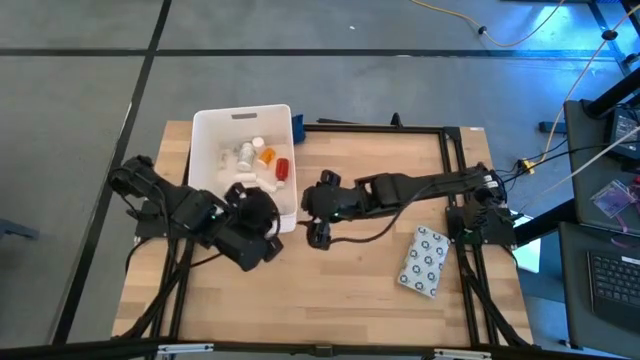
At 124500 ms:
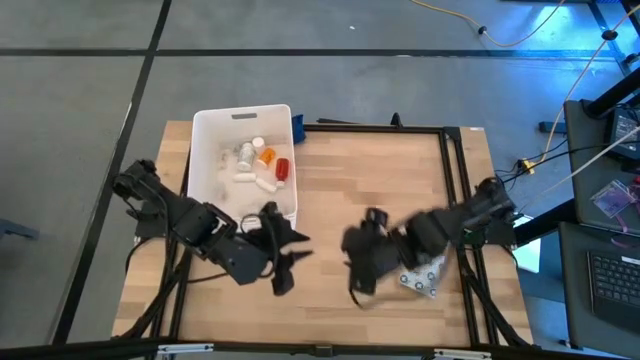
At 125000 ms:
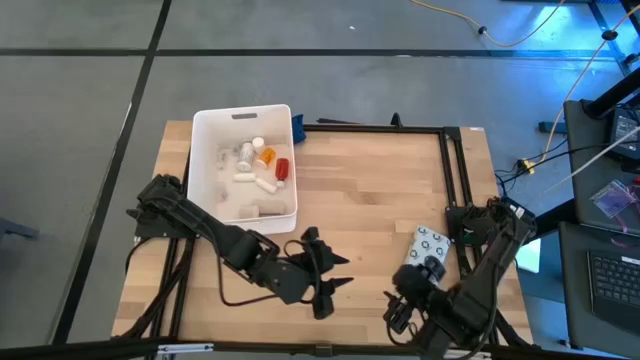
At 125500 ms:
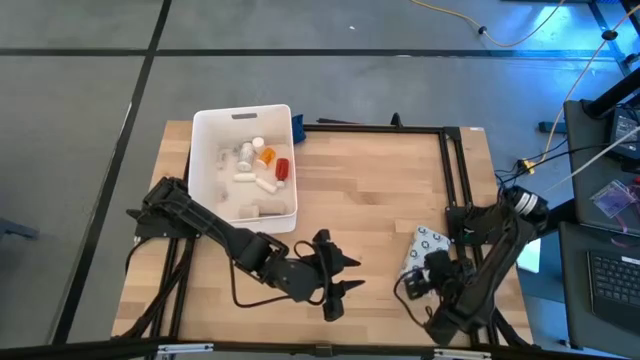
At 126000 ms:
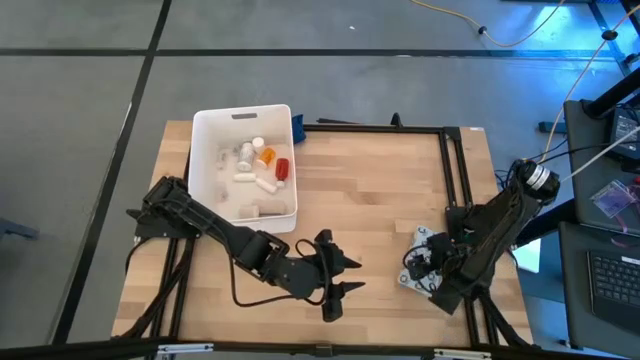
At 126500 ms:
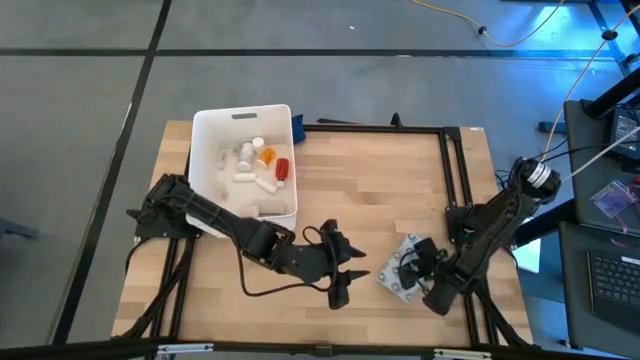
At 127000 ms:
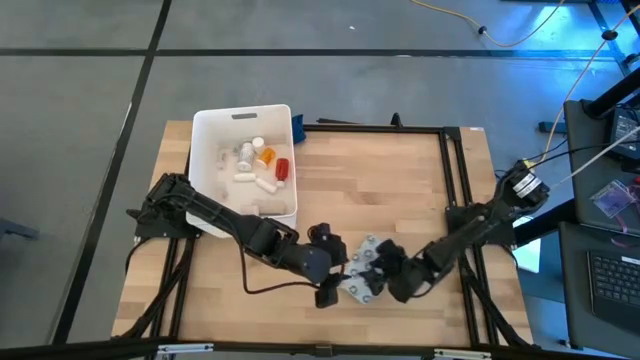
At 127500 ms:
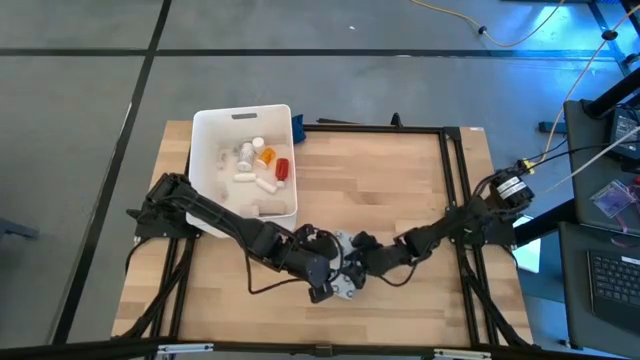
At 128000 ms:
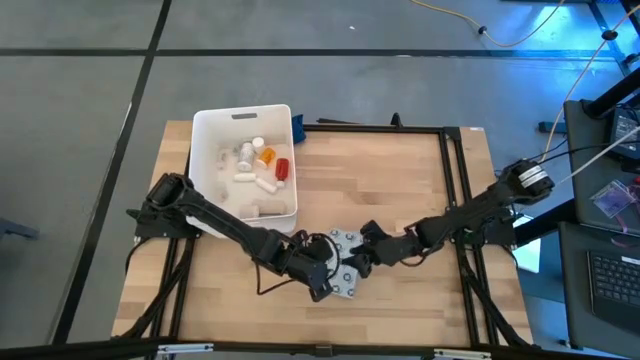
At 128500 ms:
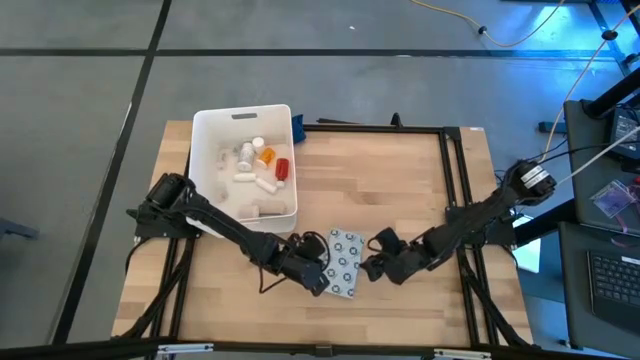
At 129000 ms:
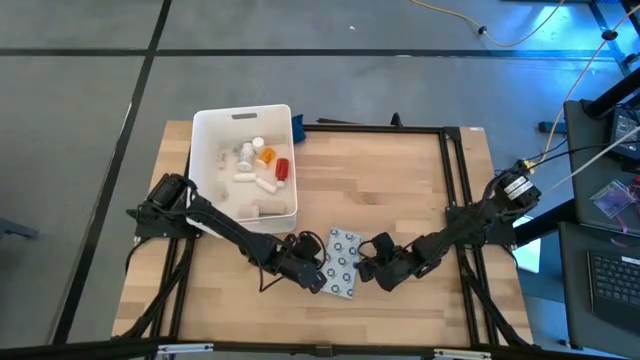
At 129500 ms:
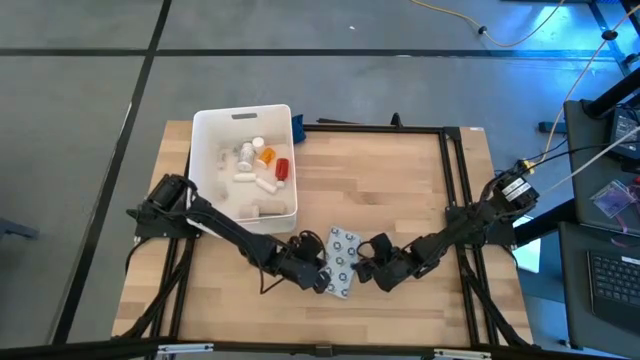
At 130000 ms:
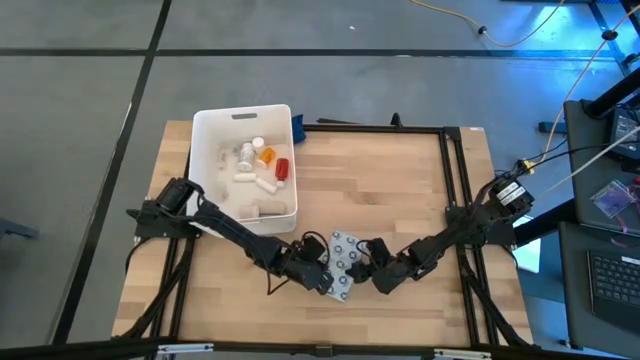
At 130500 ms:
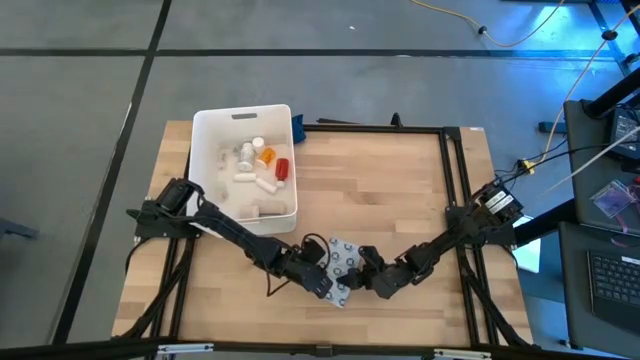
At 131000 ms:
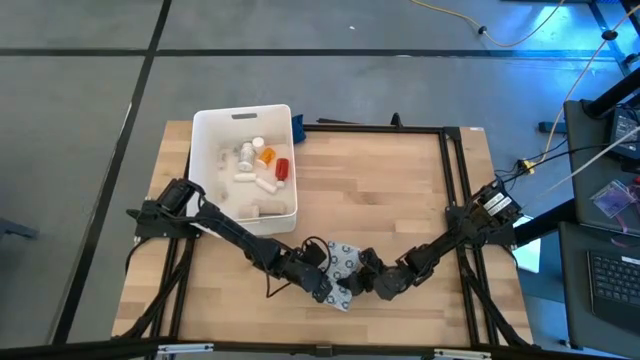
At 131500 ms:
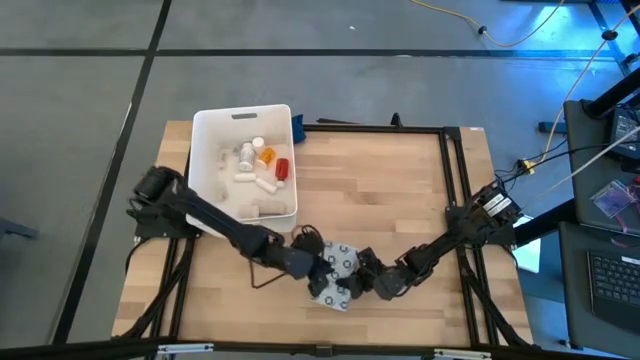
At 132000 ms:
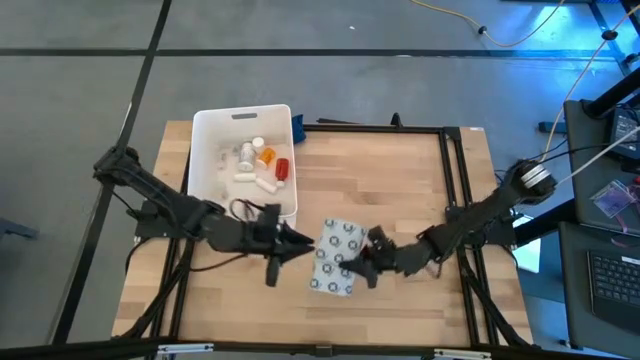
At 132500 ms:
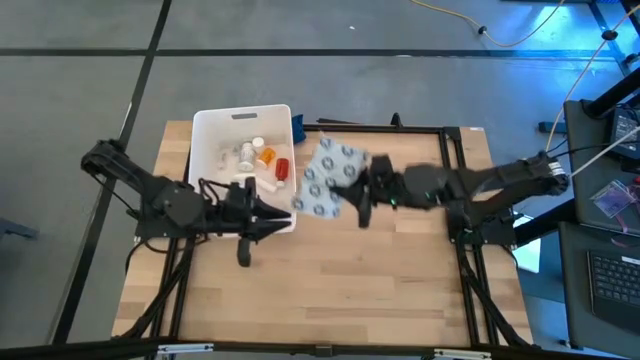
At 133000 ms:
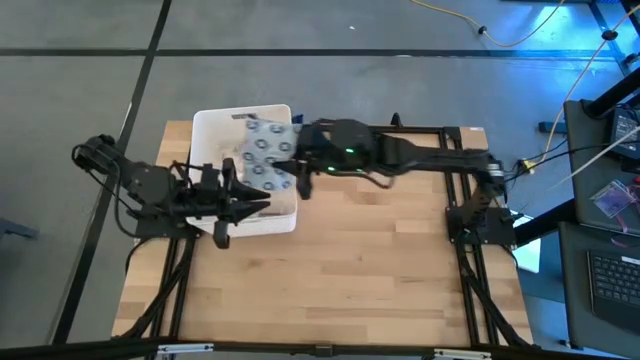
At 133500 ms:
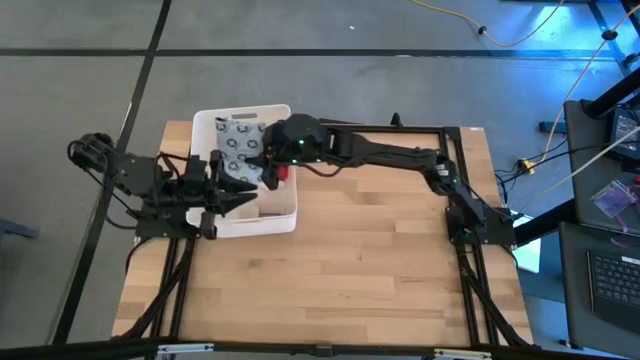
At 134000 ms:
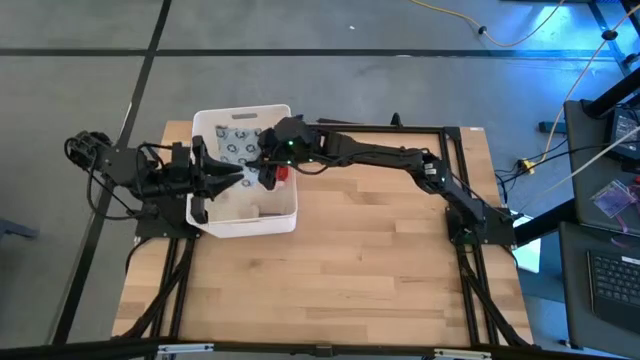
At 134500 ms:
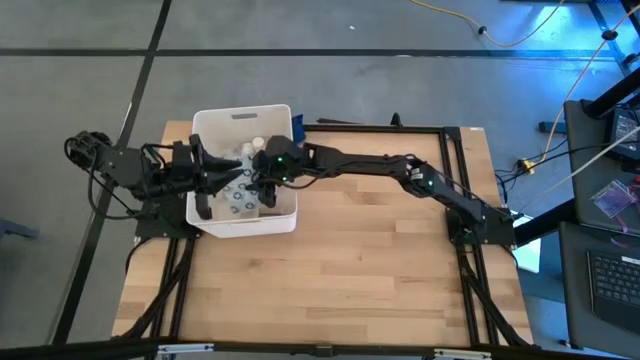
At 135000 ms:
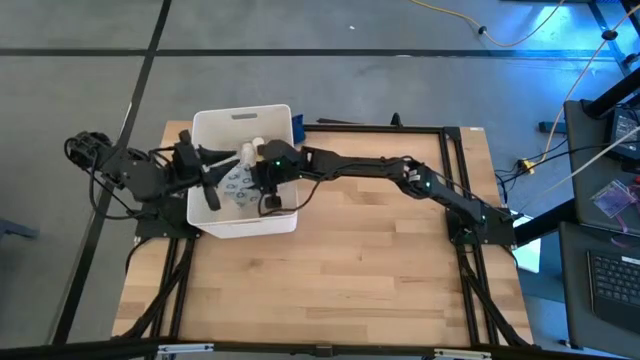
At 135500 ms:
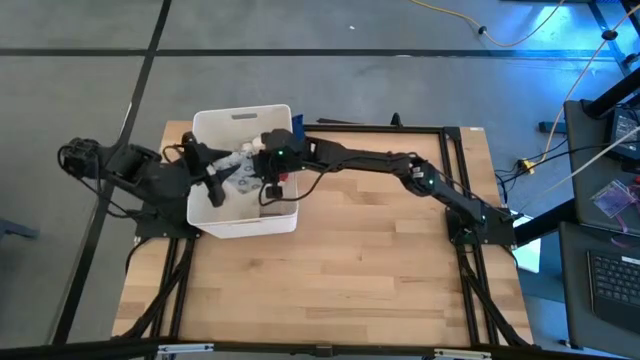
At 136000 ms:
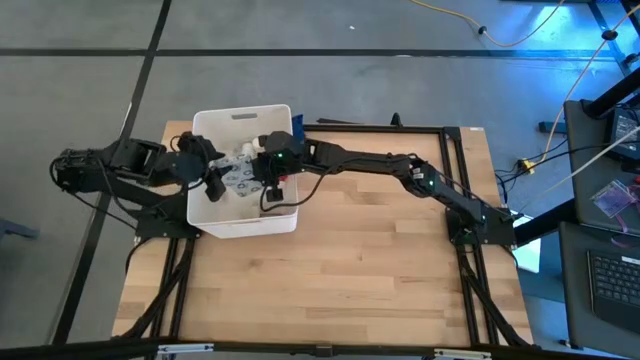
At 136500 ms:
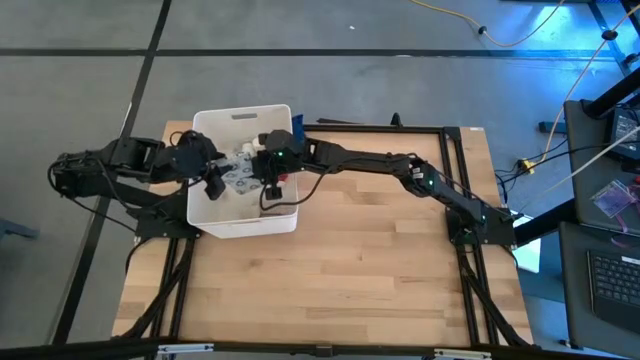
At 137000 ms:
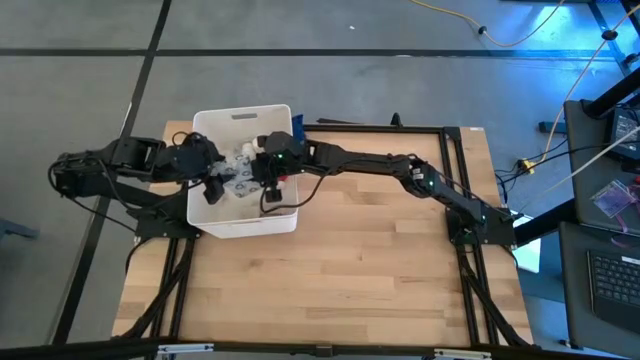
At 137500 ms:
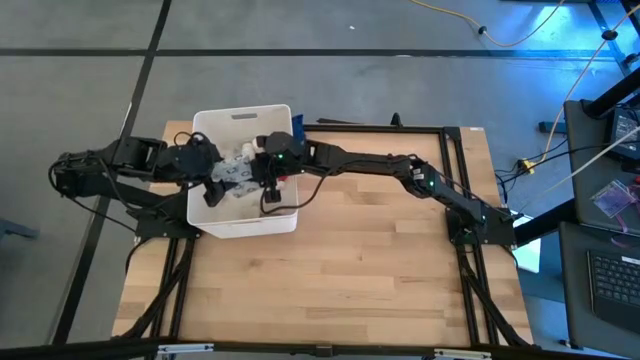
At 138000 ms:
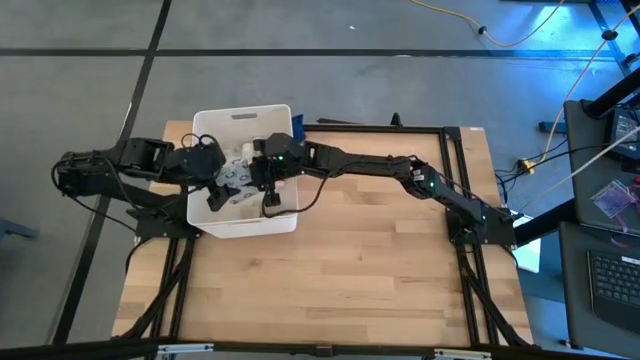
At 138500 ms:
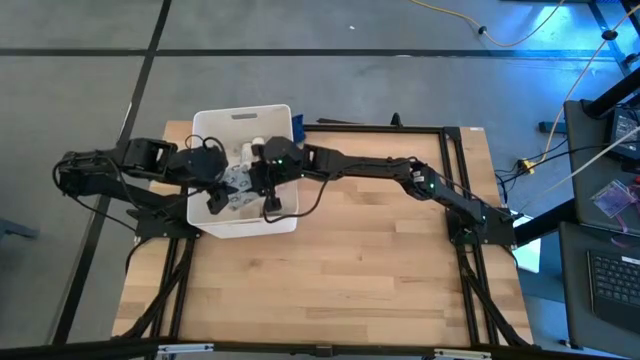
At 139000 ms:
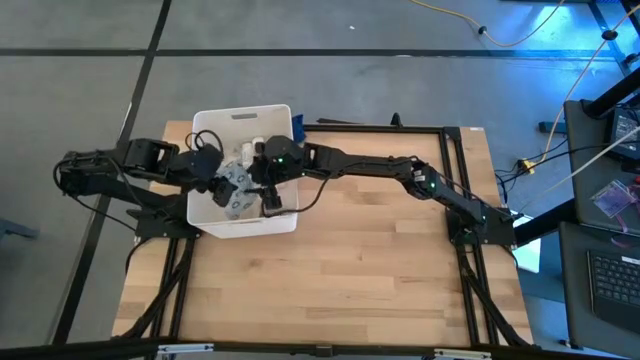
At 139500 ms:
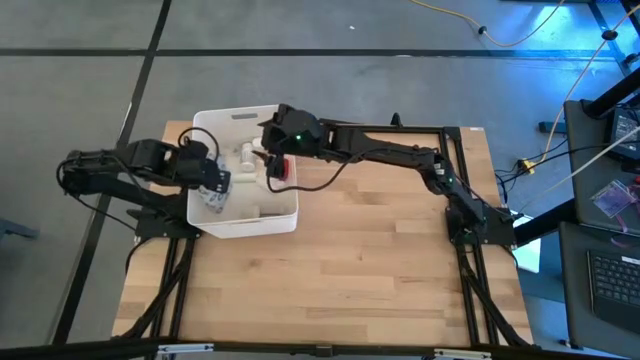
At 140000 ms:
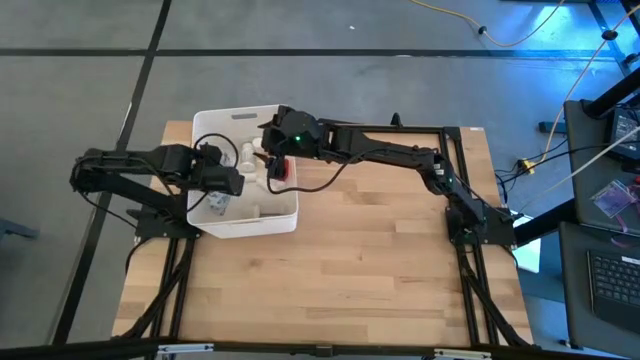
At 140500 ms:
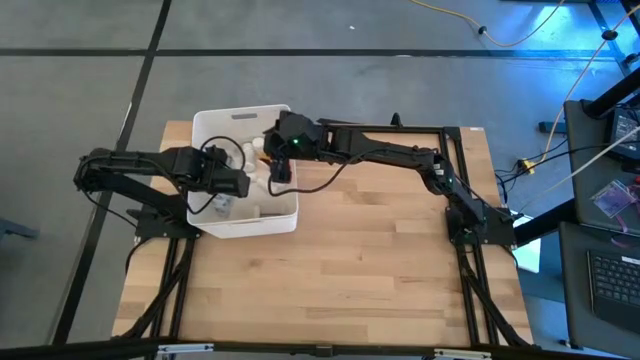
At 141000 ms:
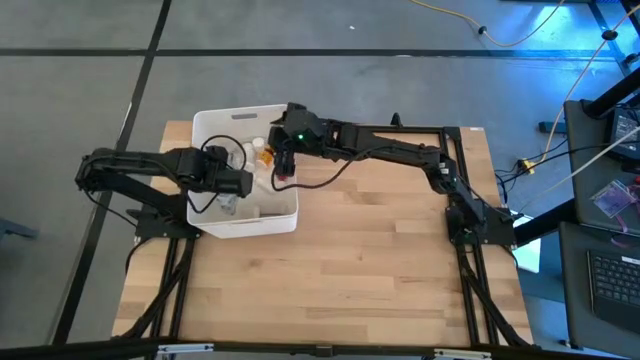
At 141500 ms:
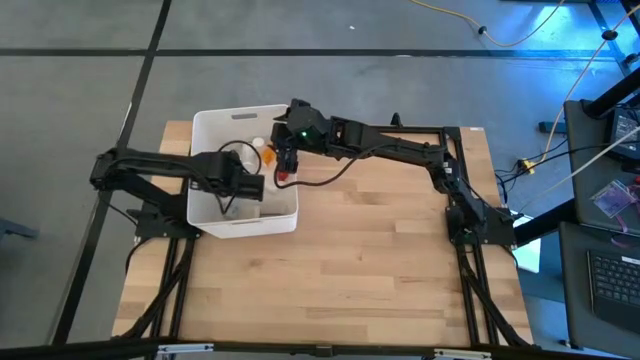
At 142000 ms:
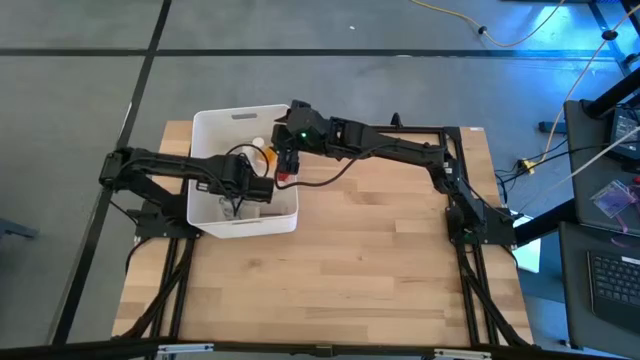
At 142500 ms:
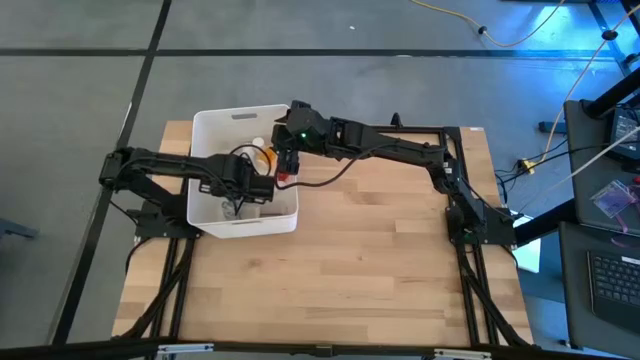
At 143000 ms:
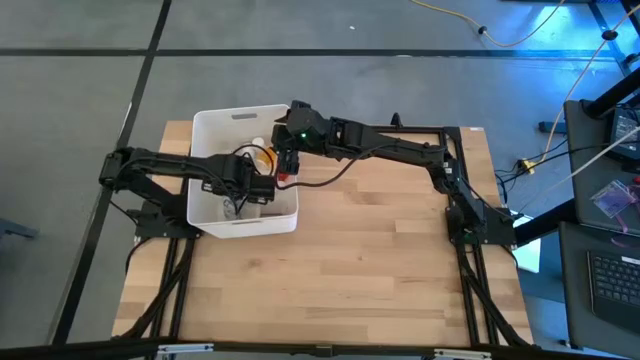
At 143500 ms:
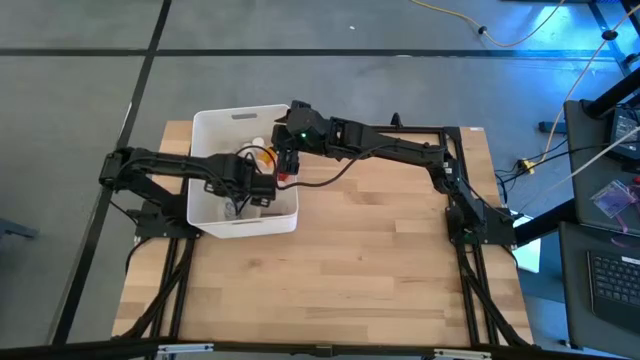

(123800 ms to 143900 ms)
Task: Pick & place medical supplies in basket/bin
Put the mailer bag into the white bin

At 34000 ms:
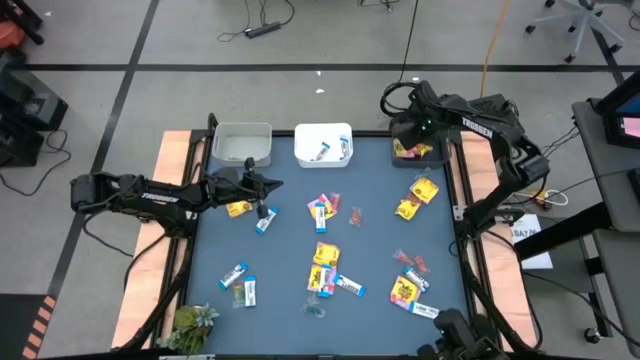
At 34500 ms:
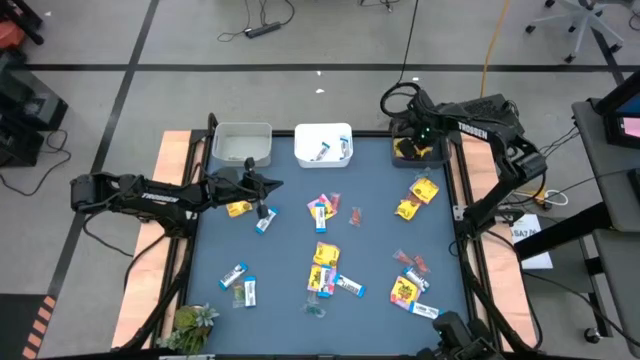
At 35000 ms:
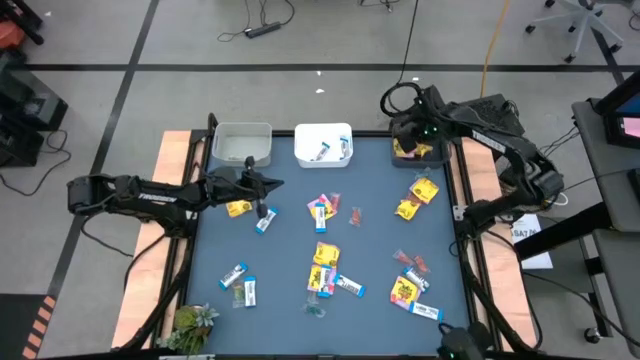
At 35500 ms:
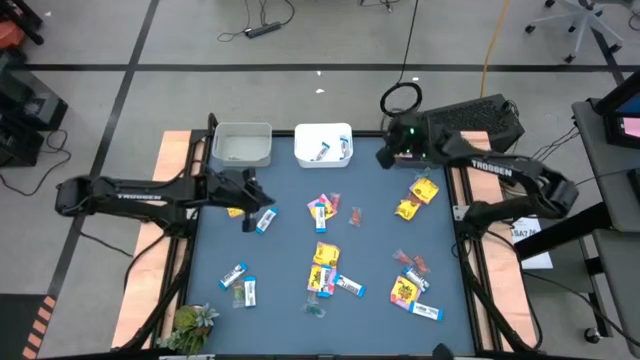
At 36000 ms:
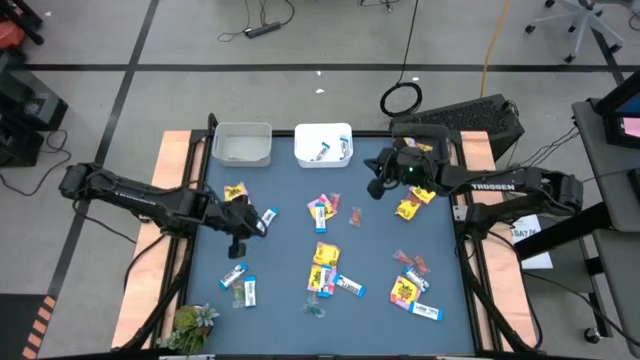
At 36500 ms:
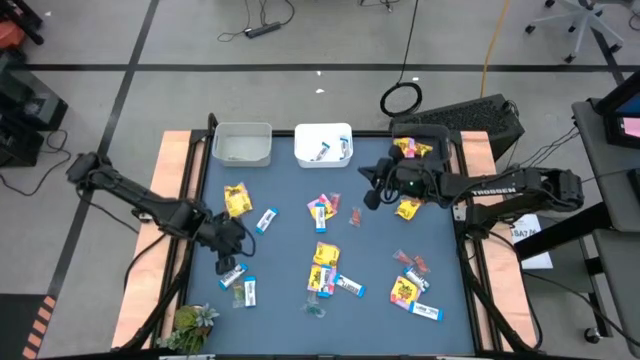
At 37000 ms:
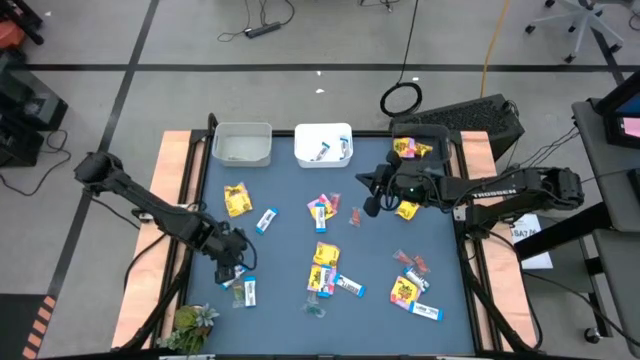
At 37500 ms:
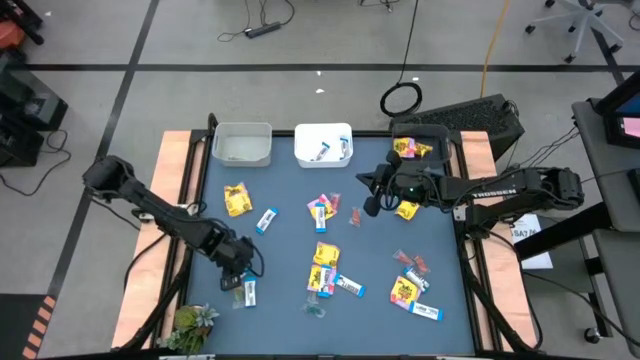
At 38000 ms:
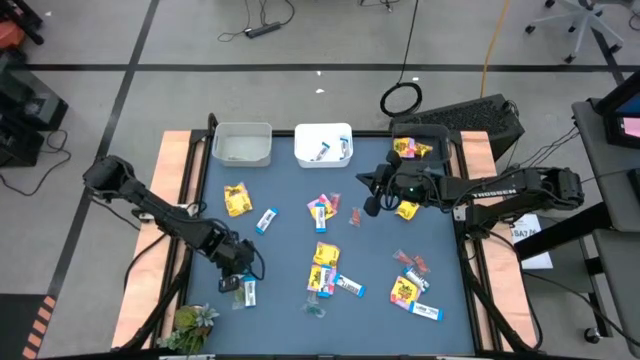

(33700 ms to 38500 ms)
Task: Sort candy
Put the white chocolate into the white bin
